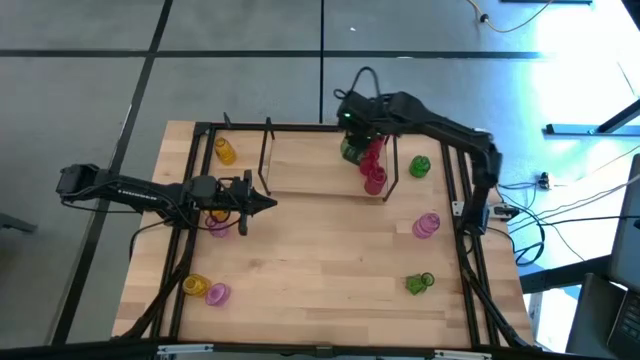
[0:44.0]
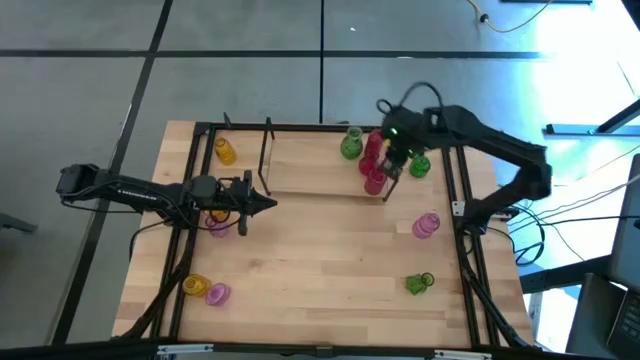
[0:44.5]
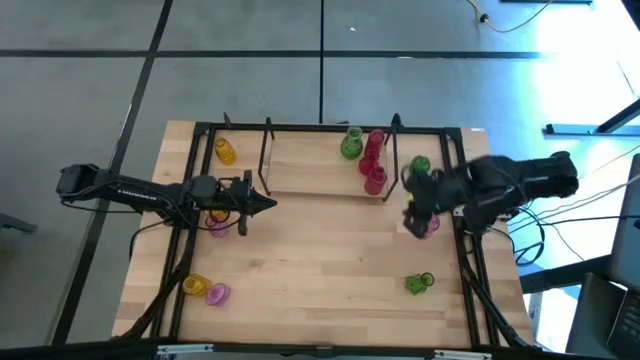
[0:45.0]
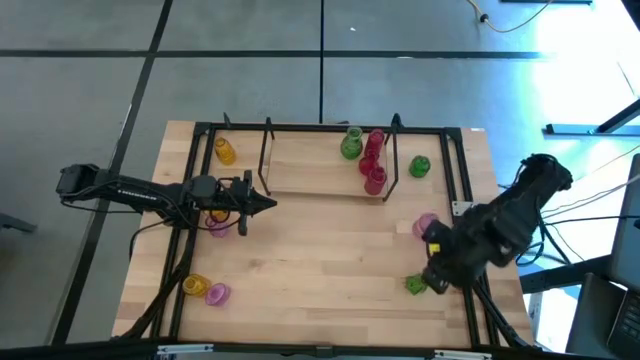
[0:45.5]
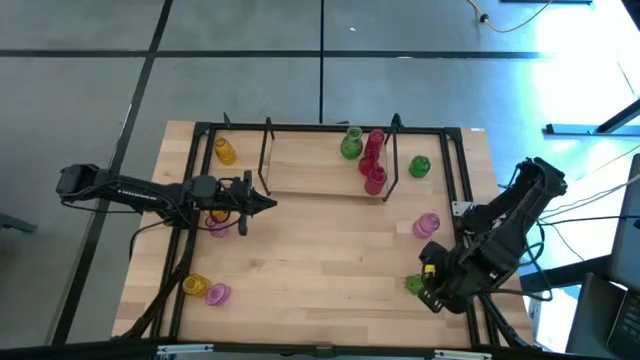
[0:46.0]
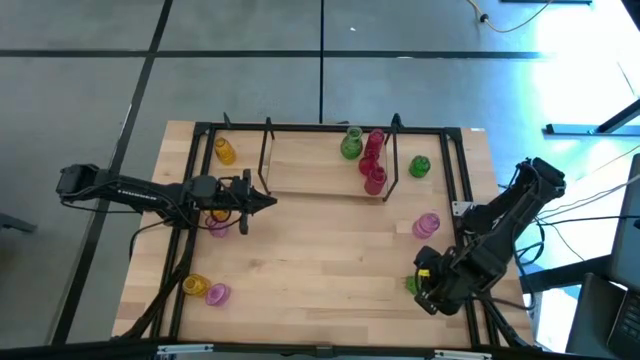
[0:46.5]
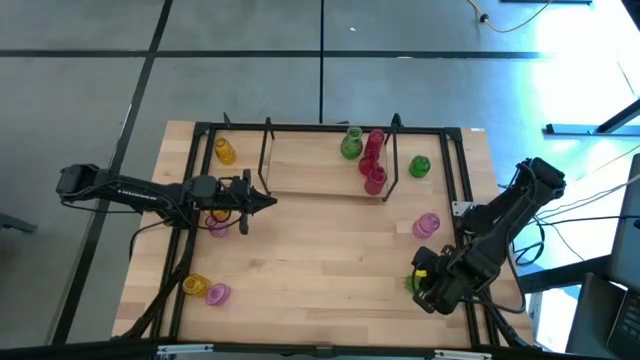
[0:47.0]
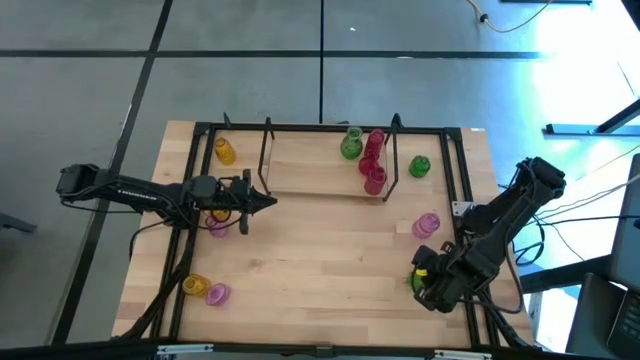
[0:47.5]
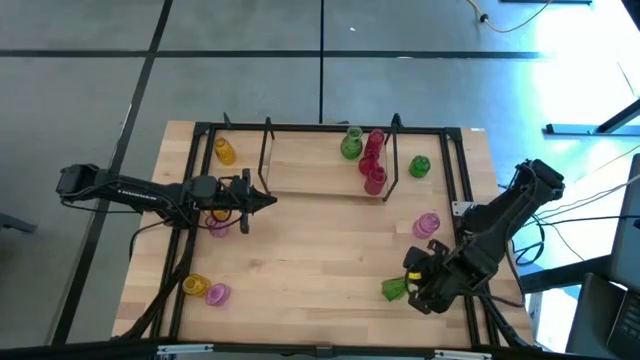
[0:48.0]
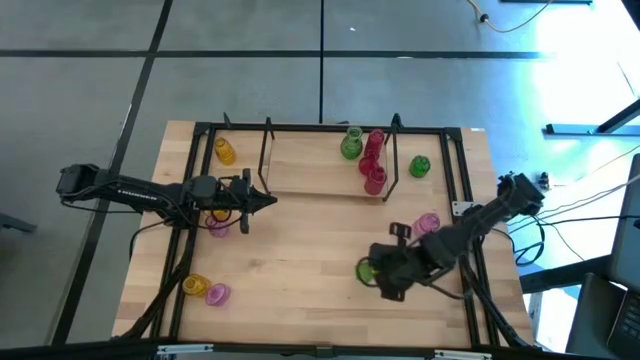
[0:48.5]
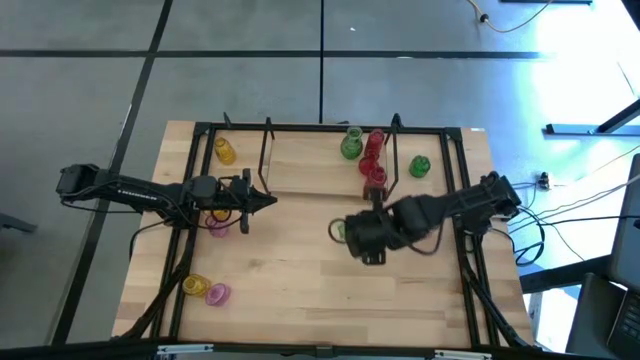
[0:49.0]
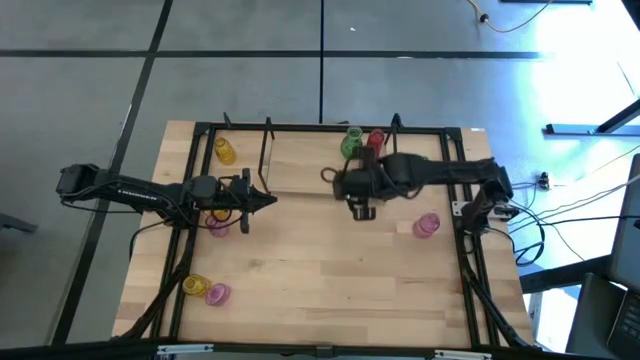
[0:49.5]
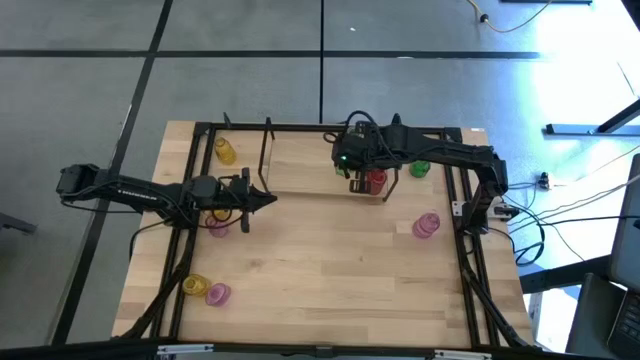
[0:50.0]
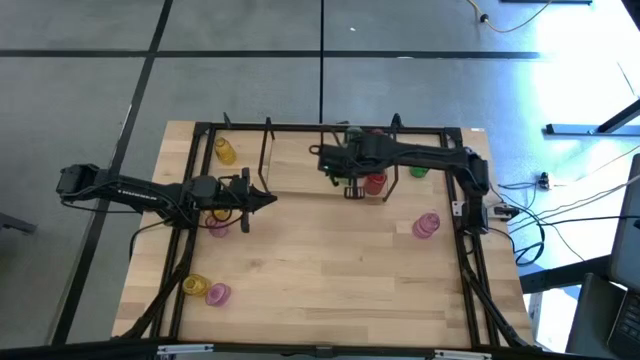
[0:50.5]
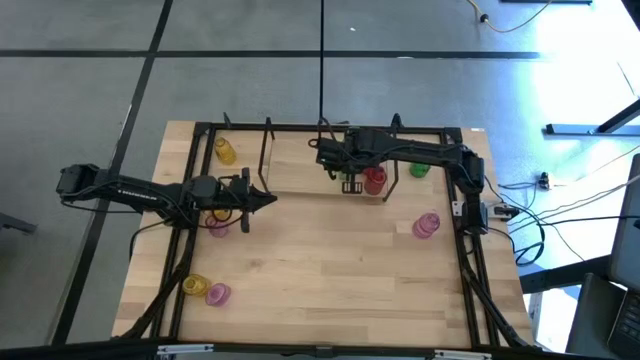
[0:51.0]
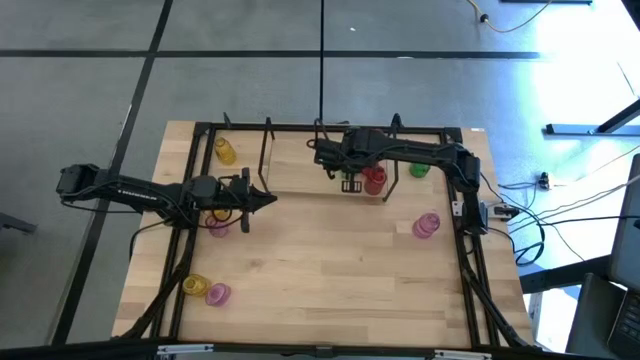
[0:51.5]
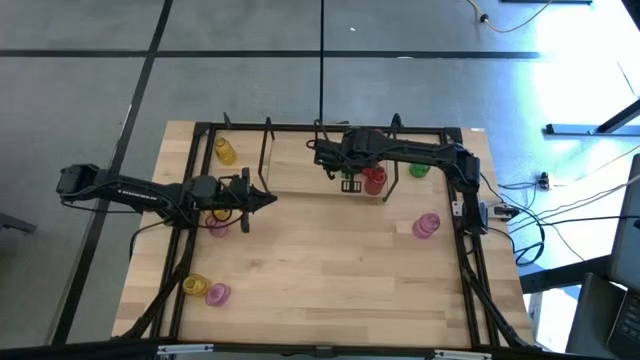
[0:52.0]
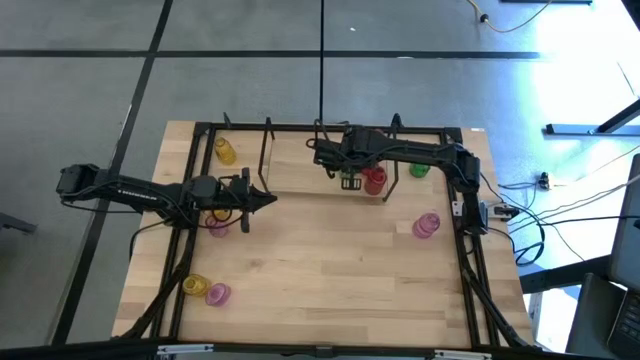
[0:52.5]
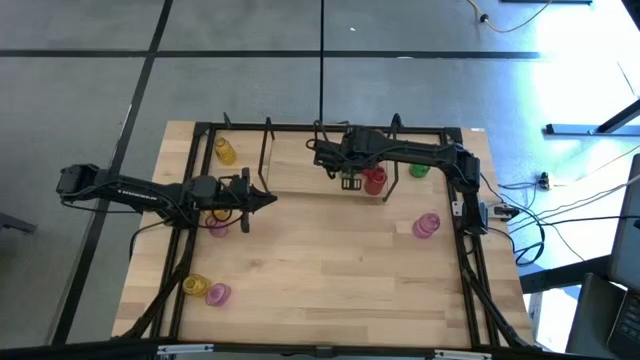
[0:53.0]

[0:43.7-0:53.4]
Task: sort vases onto shelf
Put the bottom green vase on the shelf aligned with the other green vase

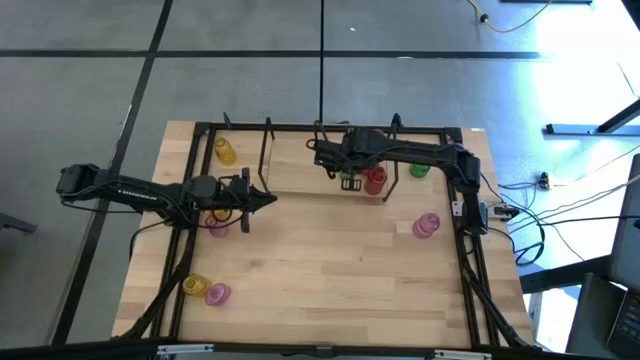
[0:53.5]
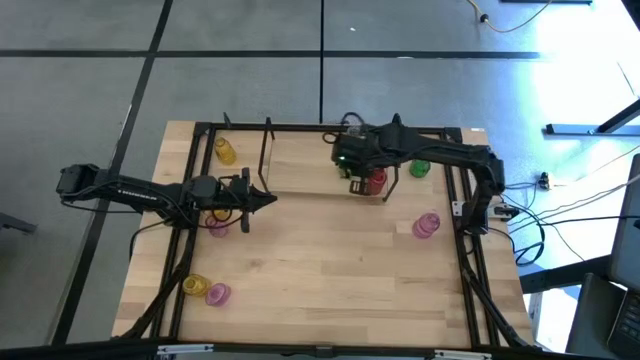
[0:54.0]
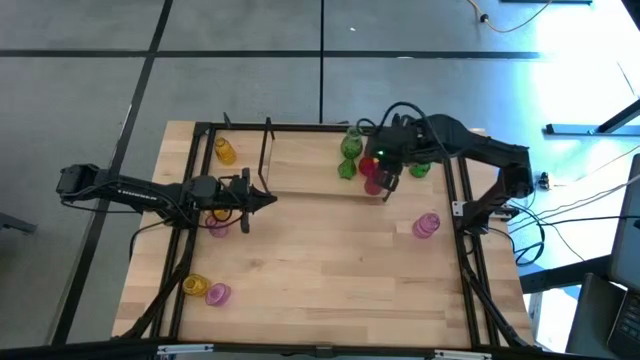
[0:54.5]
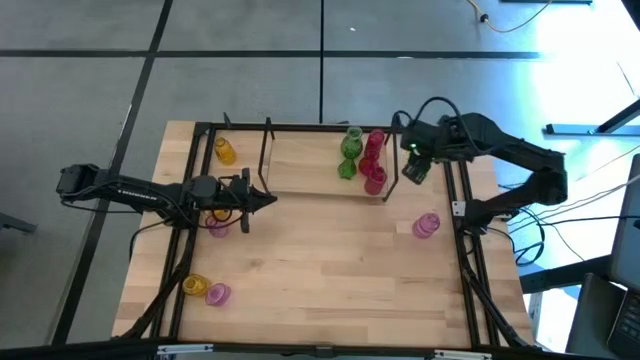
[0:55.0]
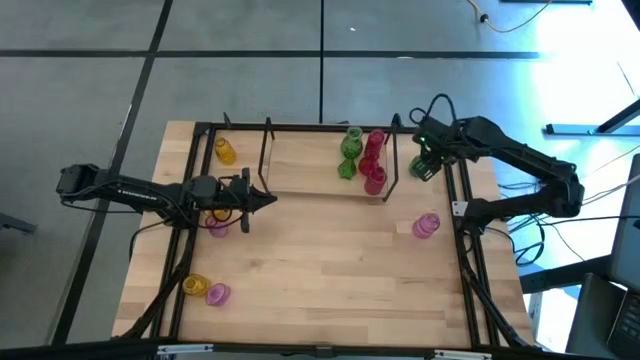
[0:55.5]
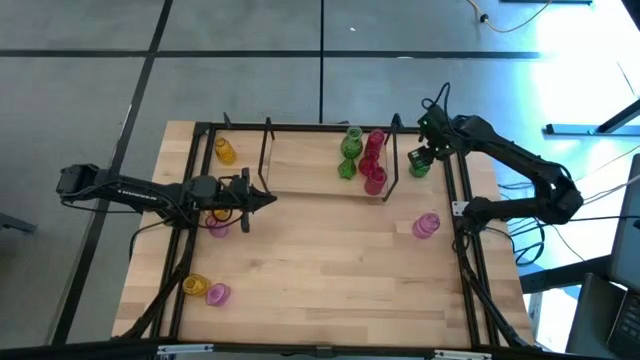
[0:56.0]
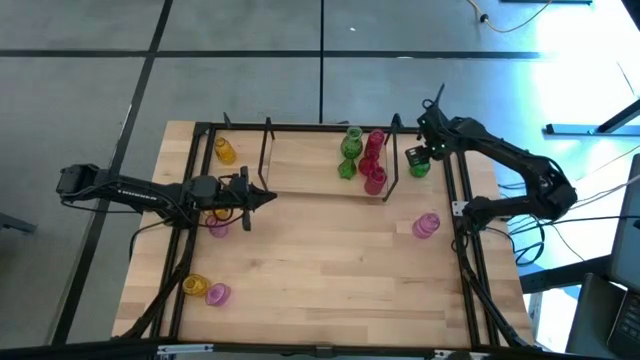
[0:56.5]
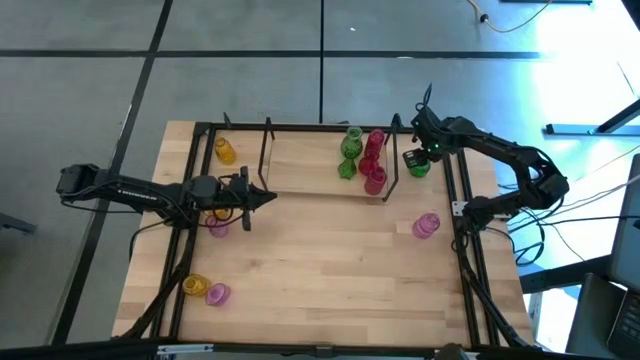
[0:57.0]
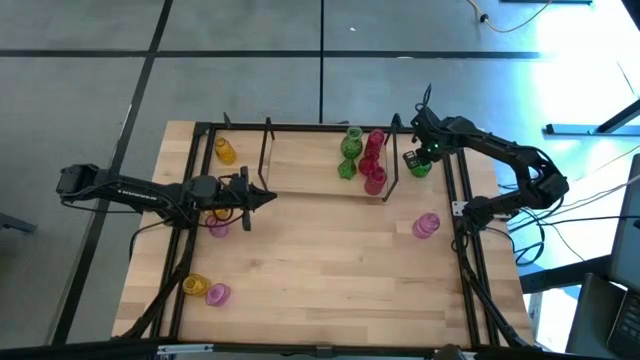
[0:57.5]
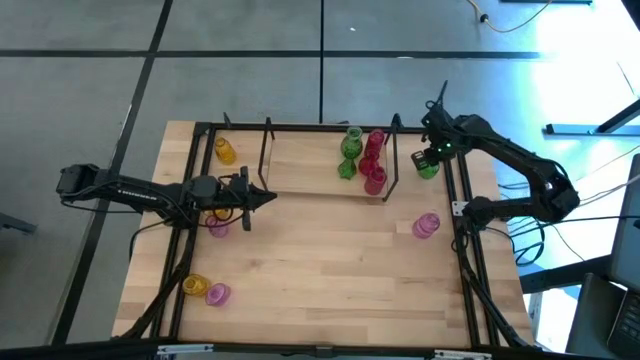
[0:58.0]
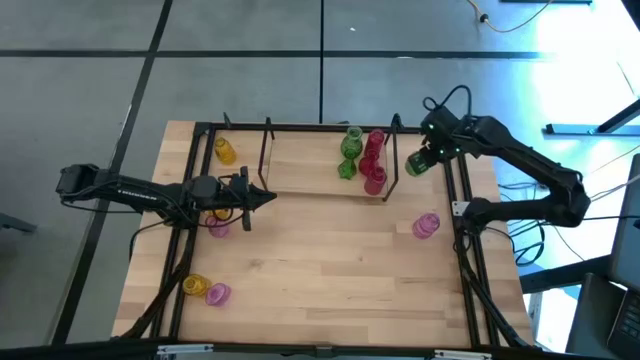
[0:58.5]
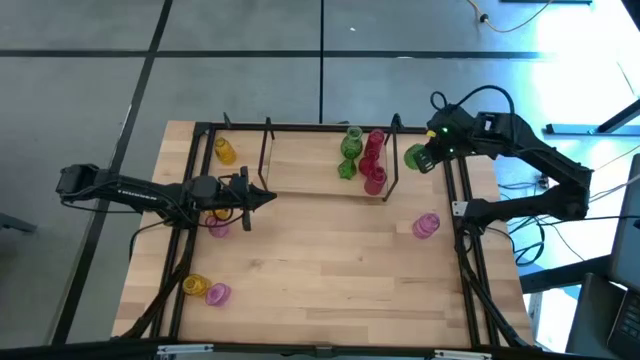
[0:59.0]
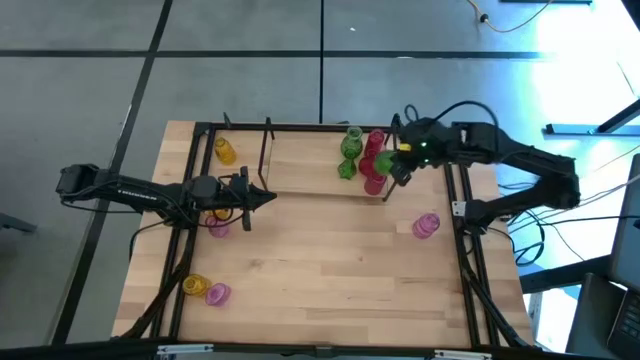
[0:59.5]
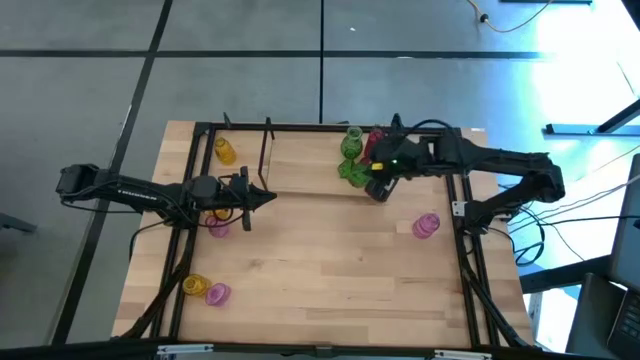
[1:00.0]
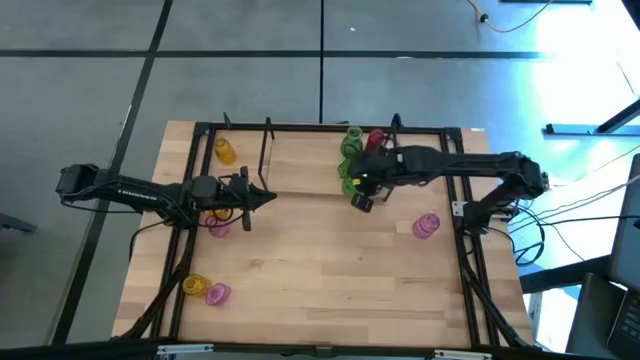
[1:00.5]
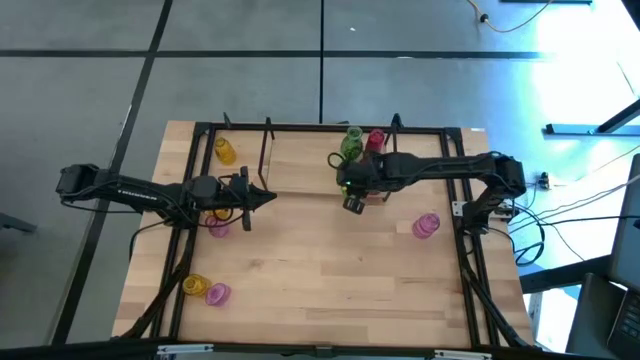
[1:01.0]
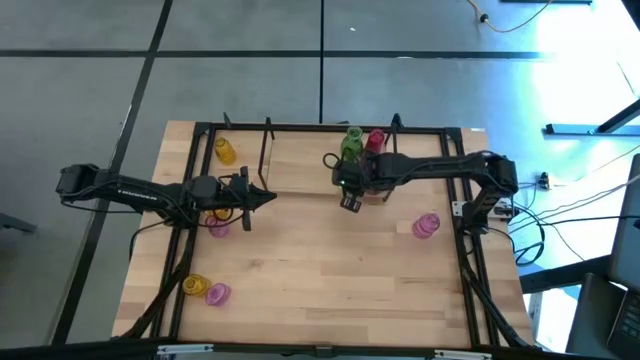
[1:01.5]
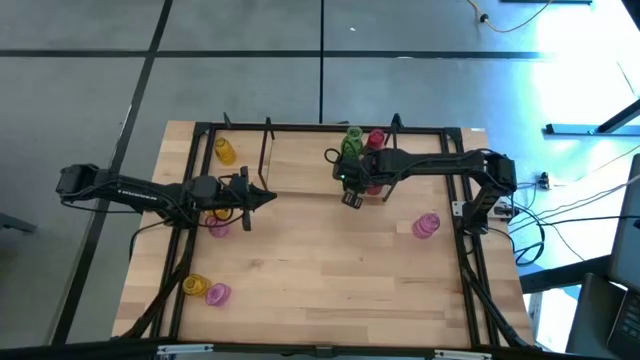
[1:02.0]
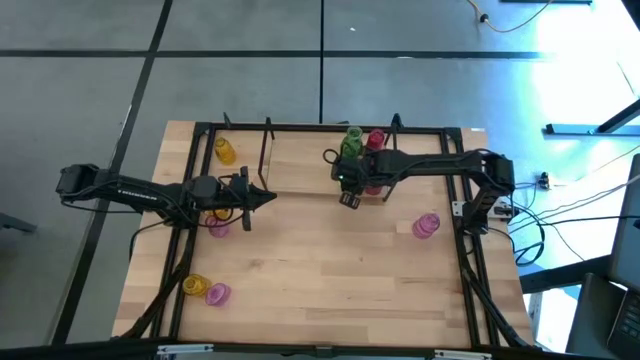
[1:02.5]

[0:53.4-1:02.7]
Put the green vase on the shelf aligned with the other green vases

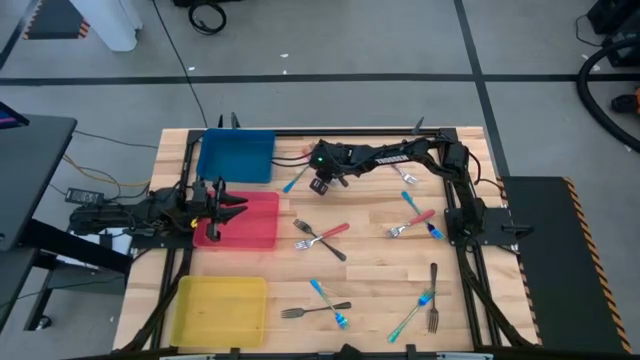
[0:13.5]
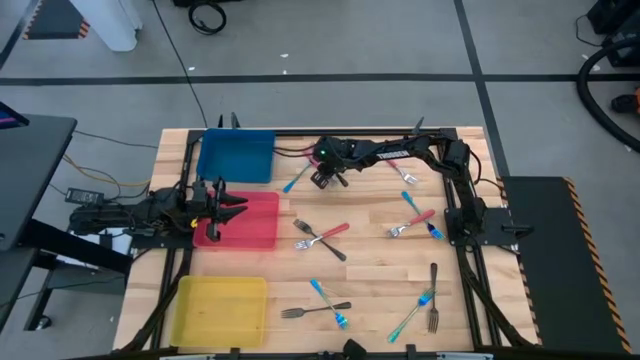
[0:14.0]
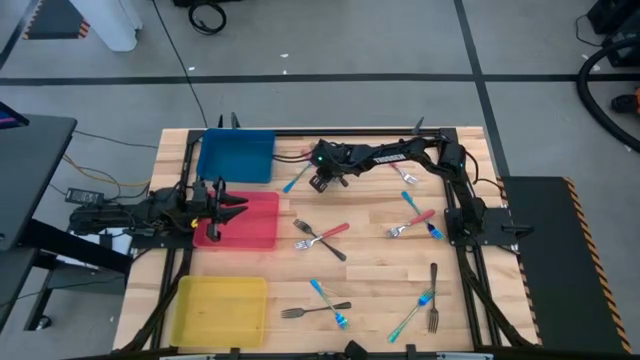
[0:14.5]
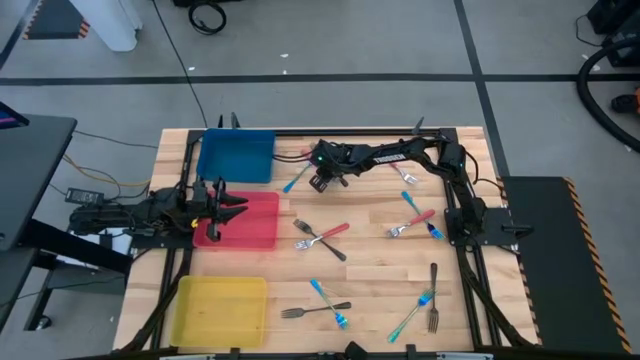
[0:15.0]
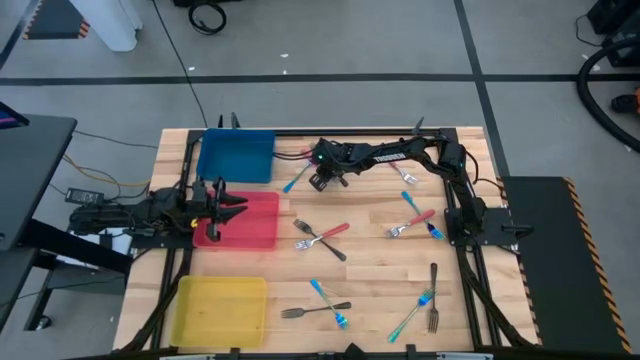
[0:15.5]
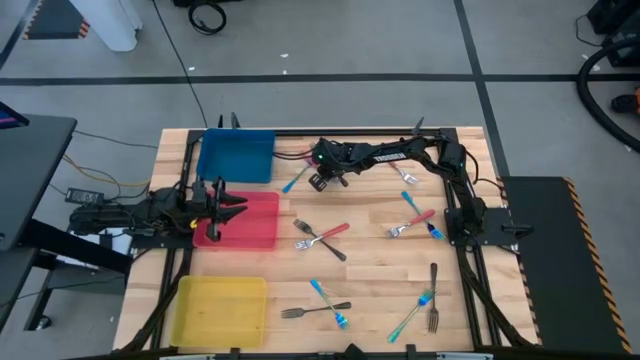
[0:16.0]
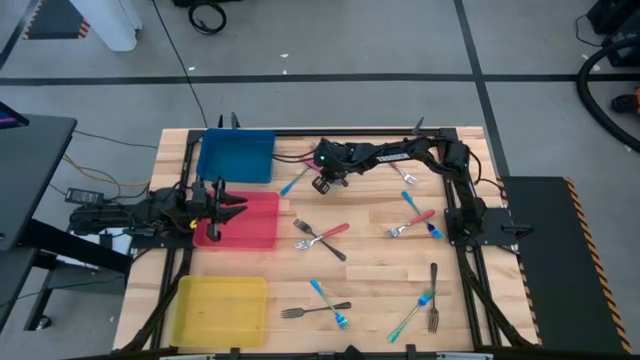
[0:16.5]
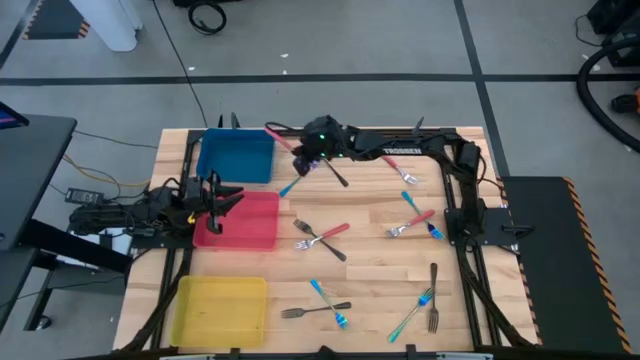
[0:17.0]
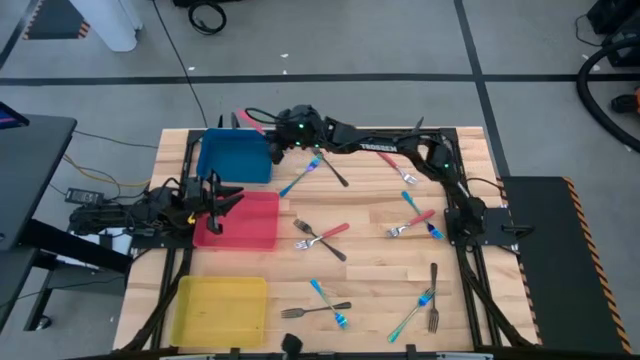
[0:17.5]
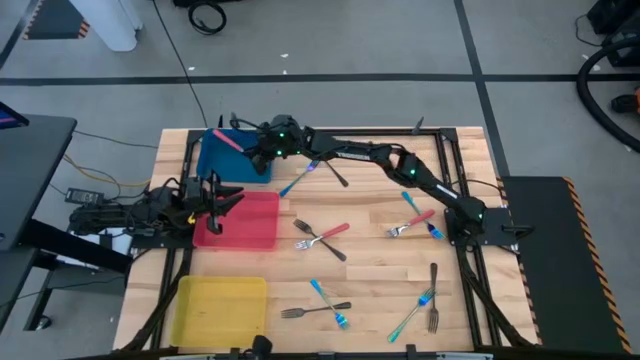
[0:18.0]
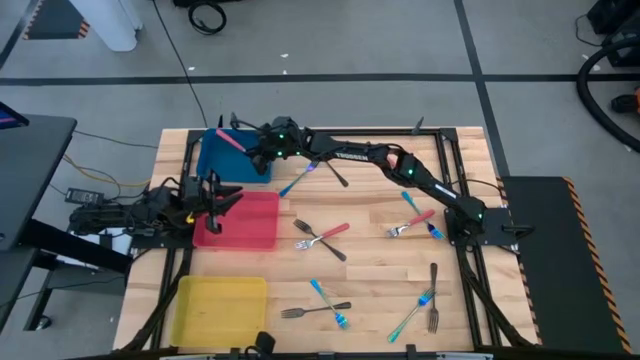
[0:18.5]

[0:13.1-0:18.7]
Task: Sort silverware by color (type)
Put the top left pink fork into the blue bin
